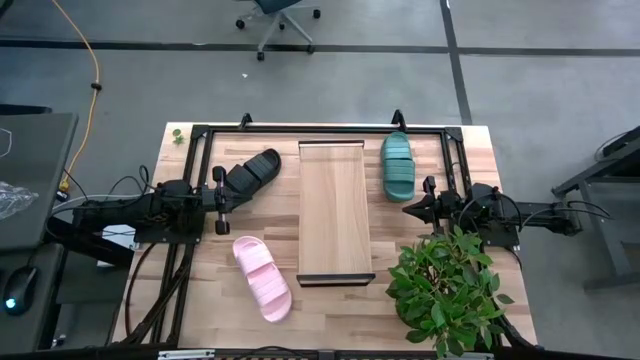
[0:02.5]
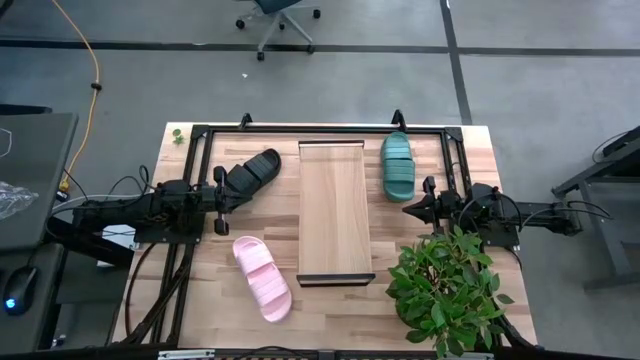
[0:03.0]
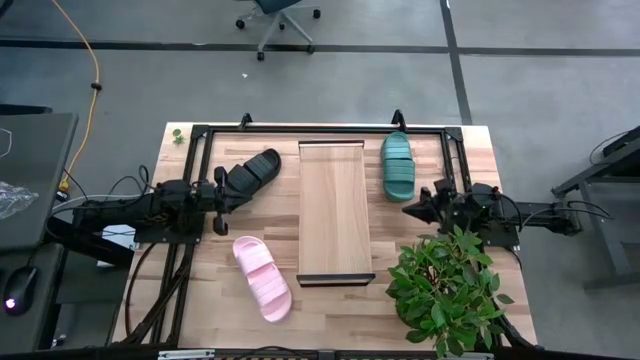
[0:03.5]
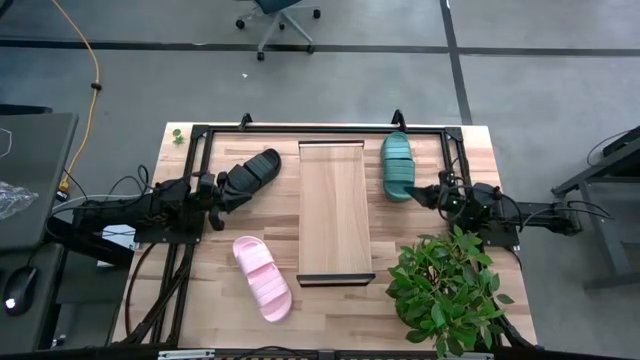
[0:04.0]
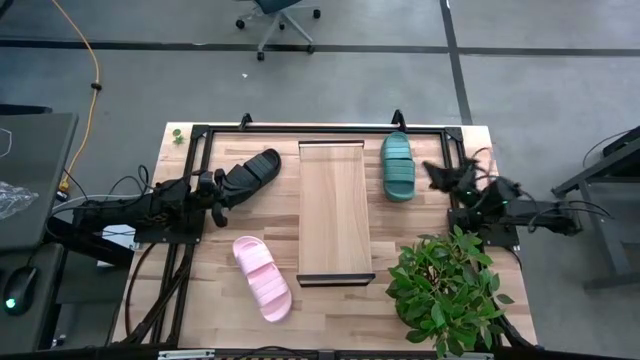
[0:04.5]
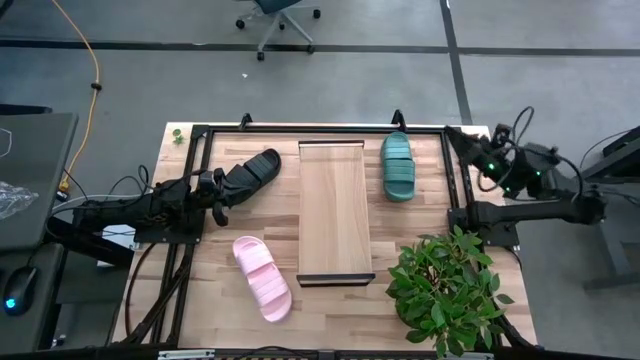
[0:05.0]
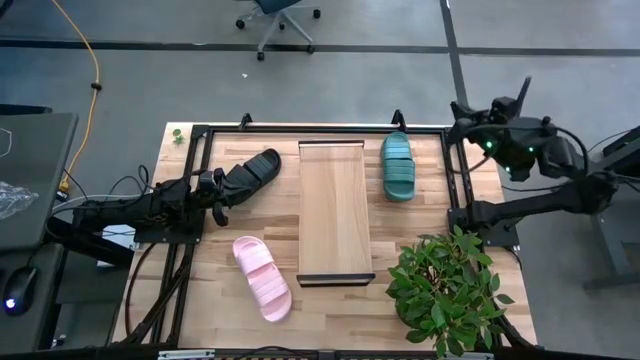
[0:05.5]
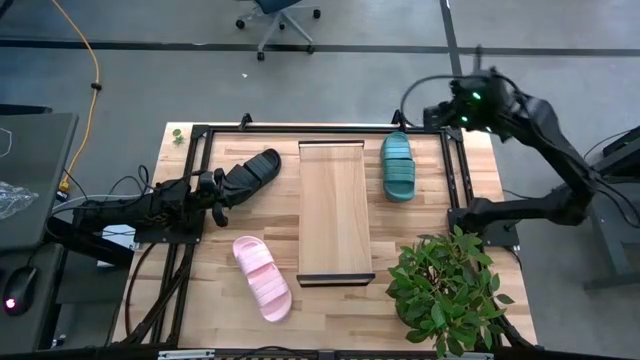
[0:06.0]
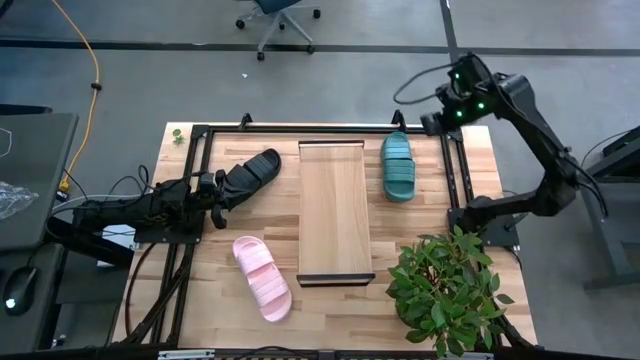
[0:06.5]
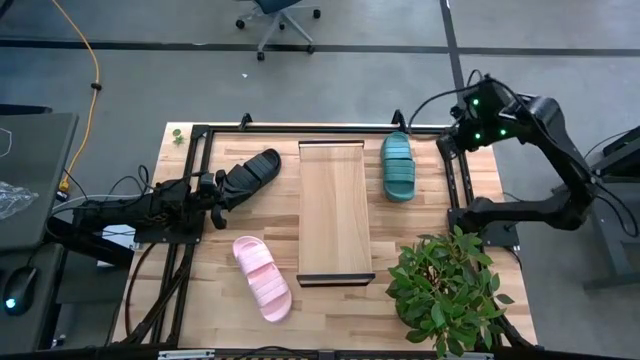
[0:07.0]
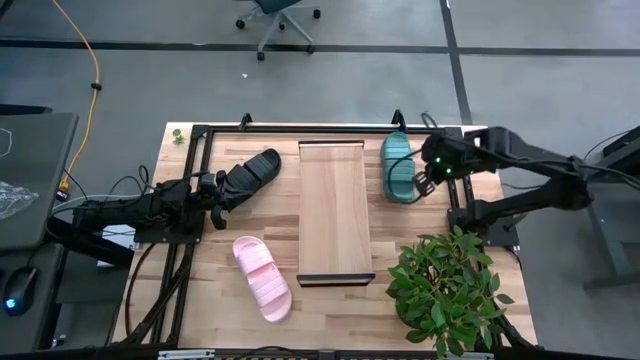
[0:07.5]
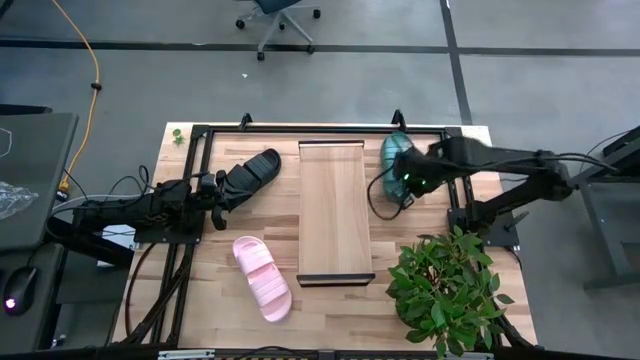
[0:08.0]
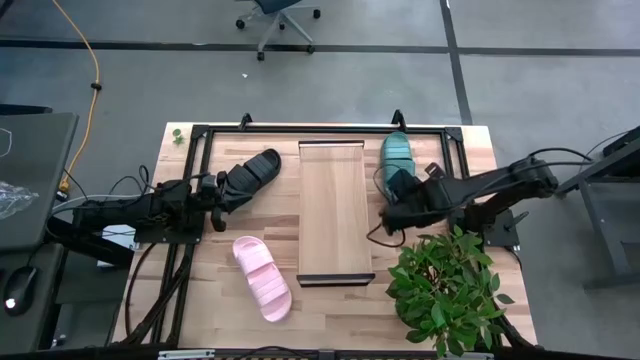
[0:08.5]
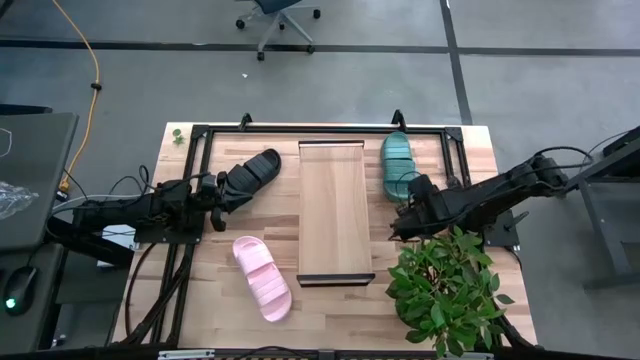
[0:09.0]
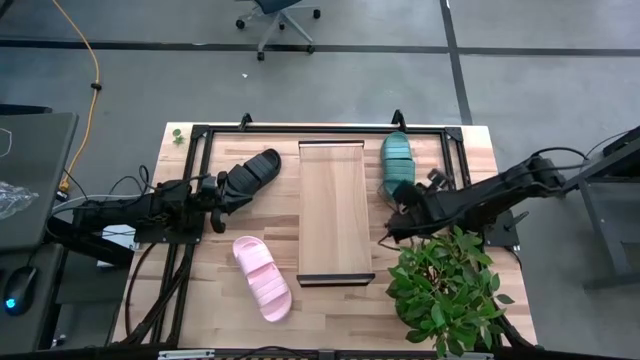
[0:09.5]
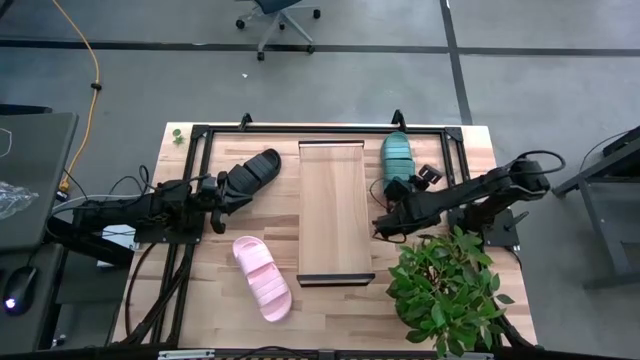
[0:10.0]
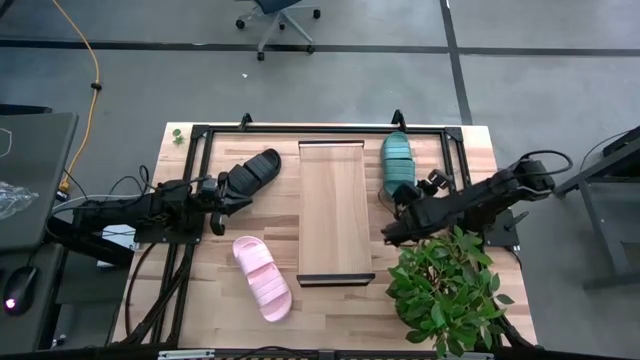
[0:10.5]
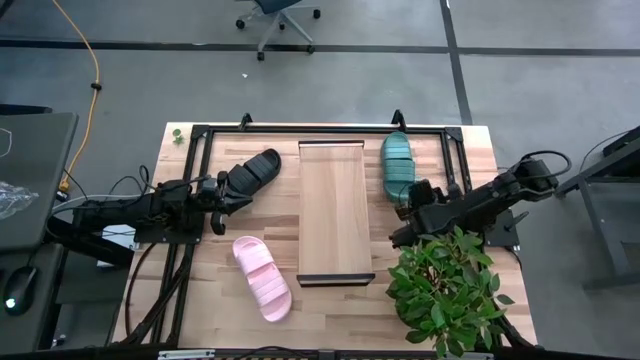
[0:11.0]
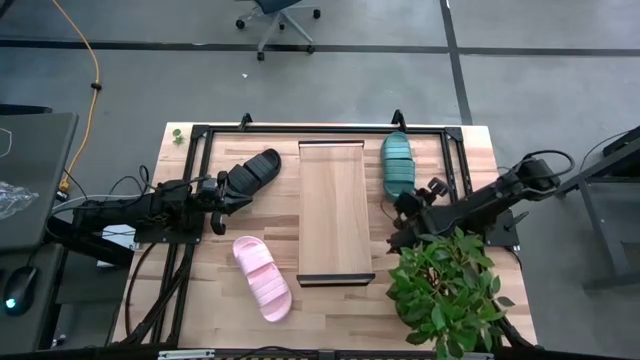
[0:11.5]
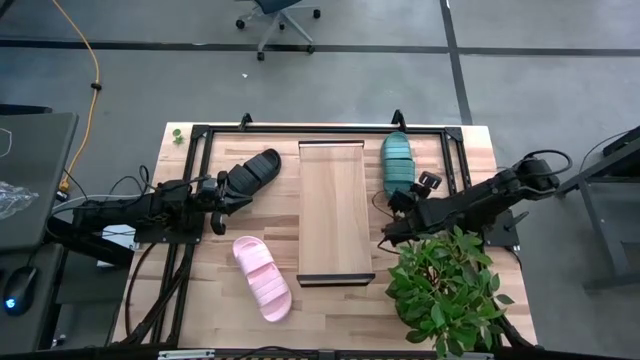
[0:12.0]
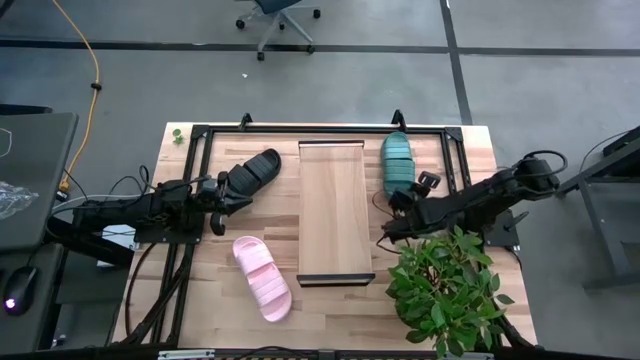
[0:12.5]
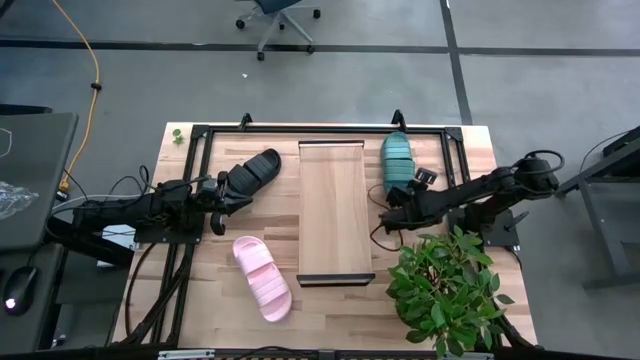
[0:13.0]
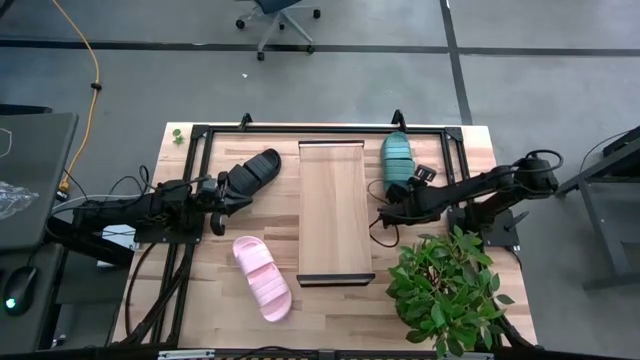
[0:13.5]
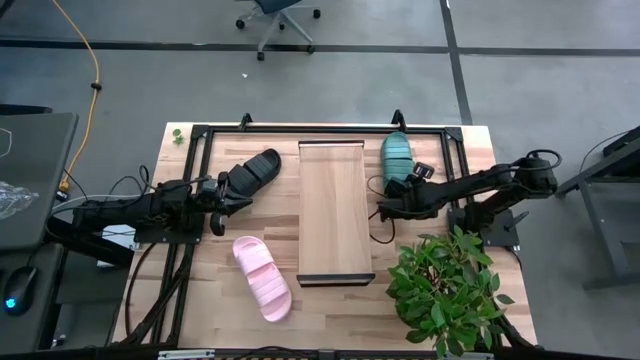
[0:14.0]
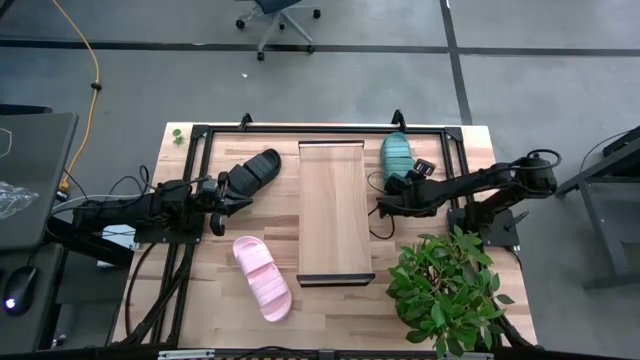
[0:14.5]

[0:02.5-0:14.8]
Task: Pick and place slippers onto the shelf
Put the green pair of slippers on the shelf

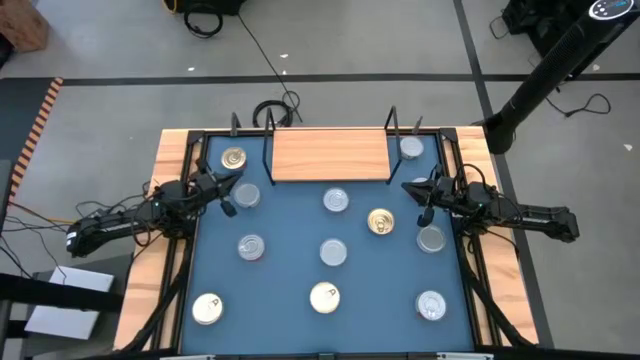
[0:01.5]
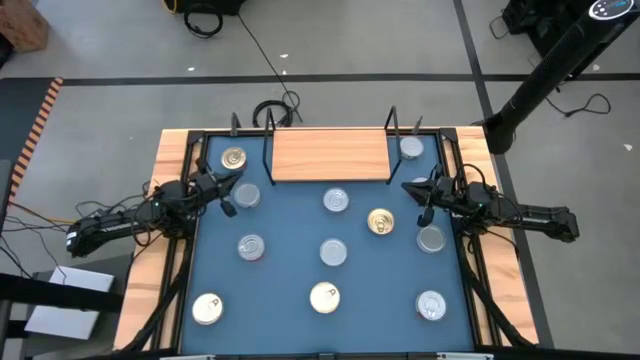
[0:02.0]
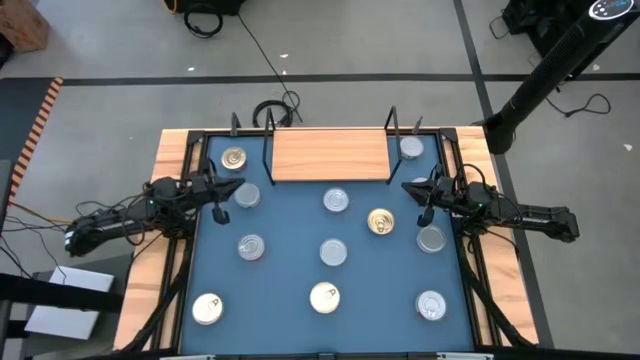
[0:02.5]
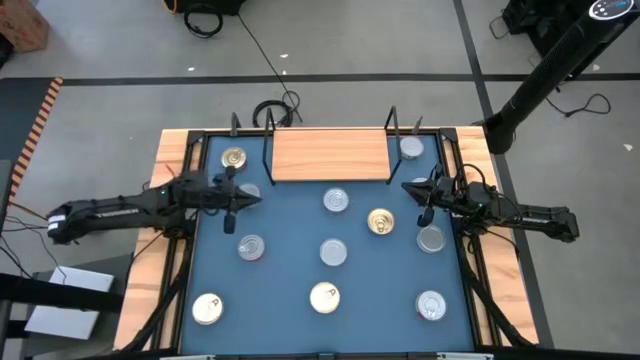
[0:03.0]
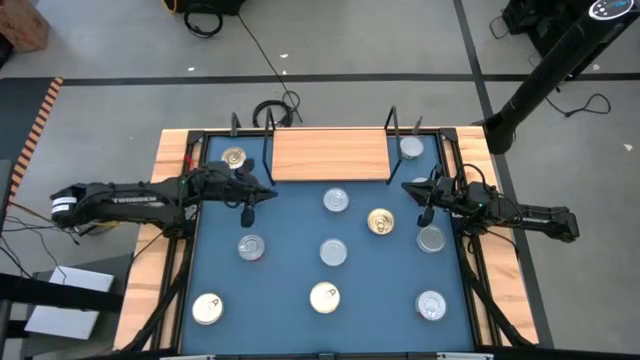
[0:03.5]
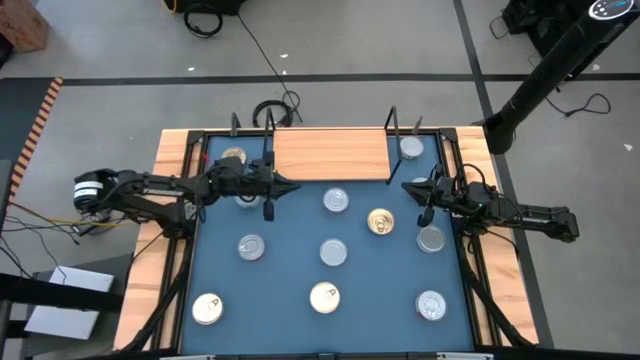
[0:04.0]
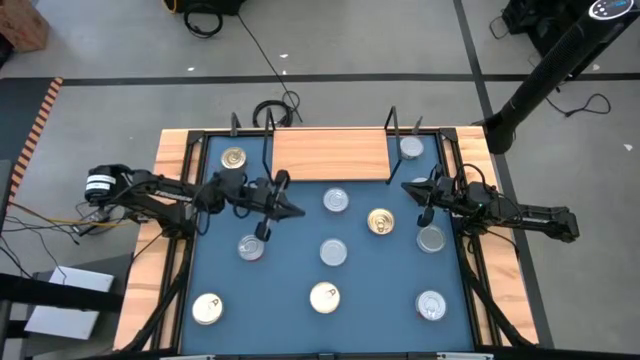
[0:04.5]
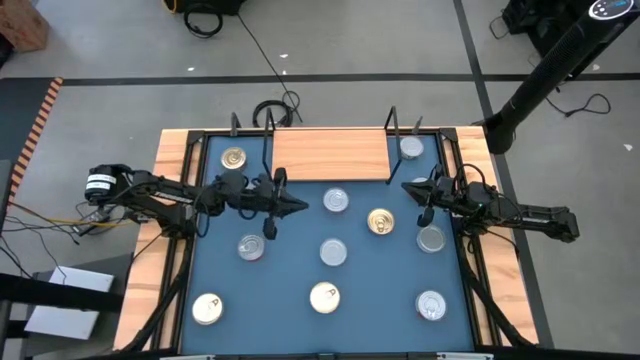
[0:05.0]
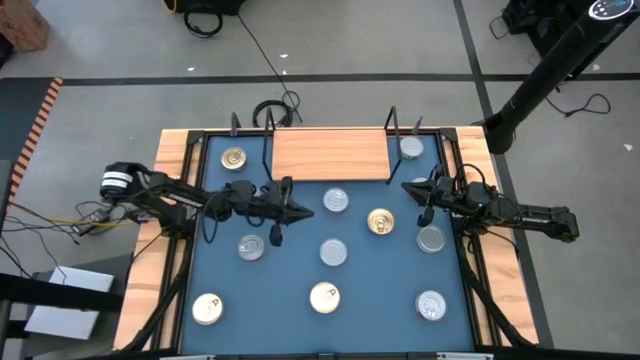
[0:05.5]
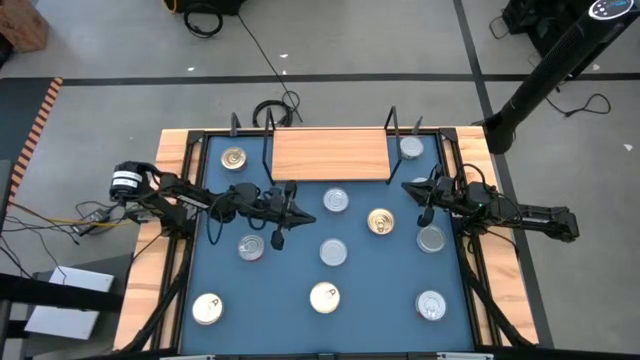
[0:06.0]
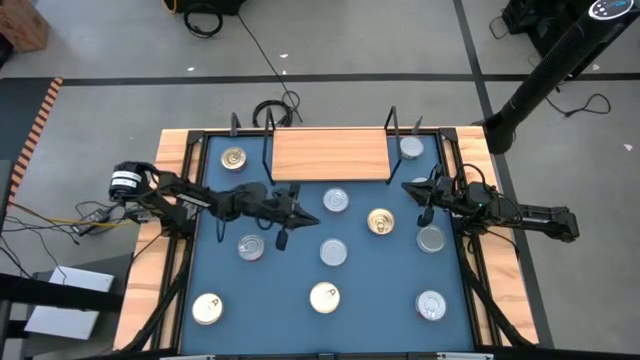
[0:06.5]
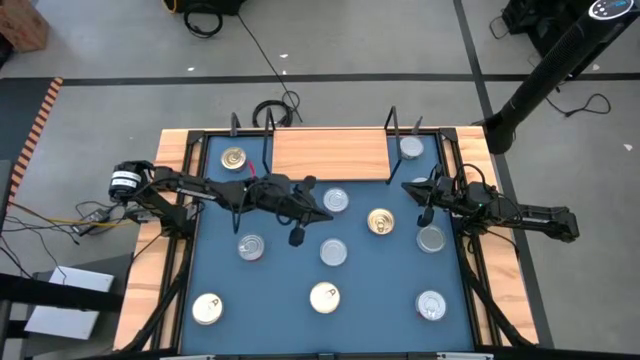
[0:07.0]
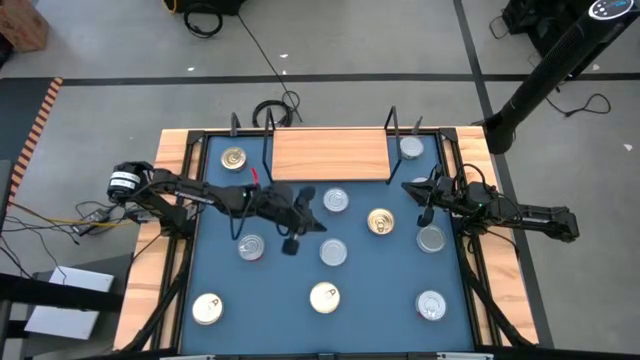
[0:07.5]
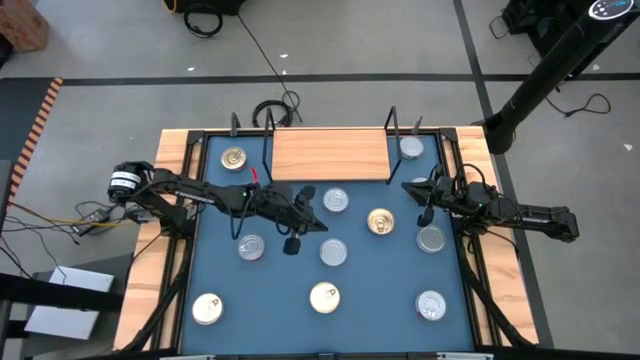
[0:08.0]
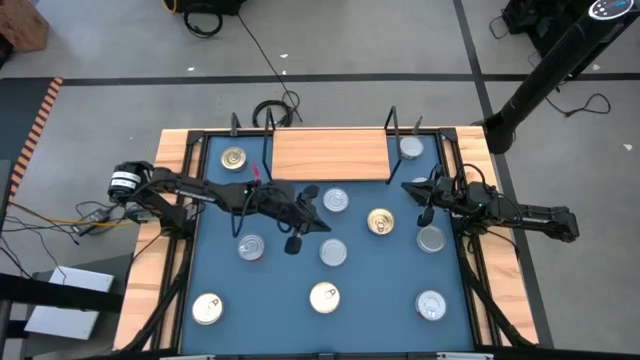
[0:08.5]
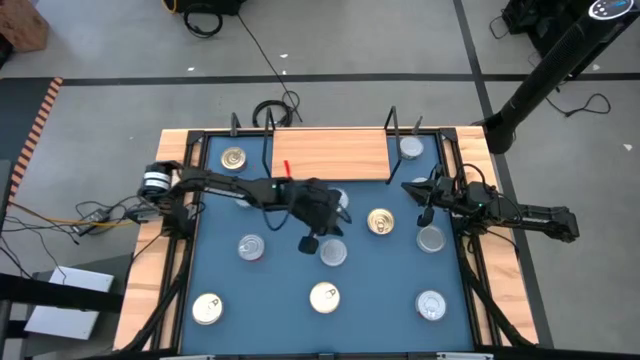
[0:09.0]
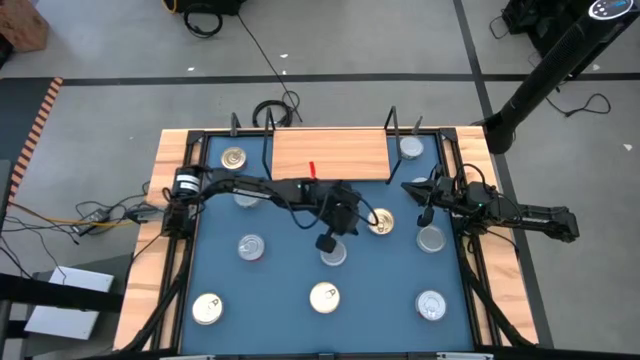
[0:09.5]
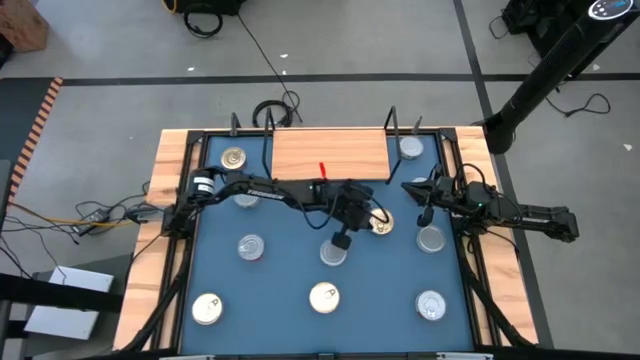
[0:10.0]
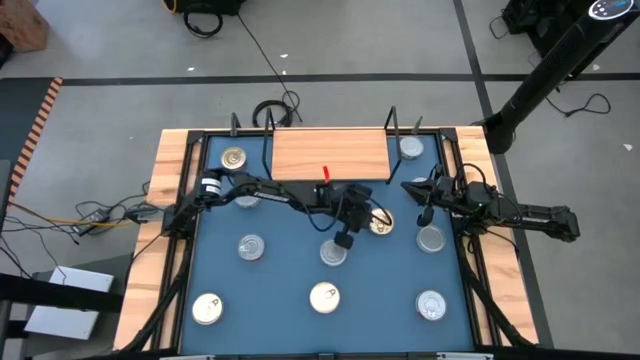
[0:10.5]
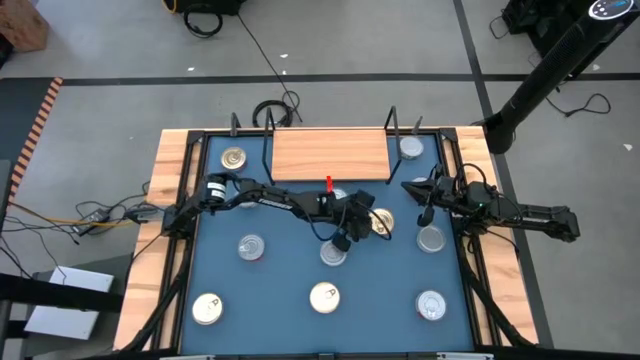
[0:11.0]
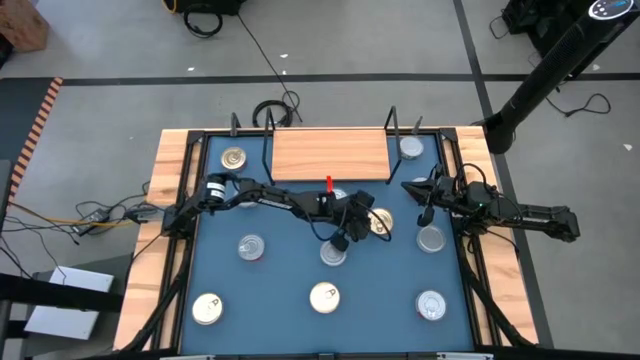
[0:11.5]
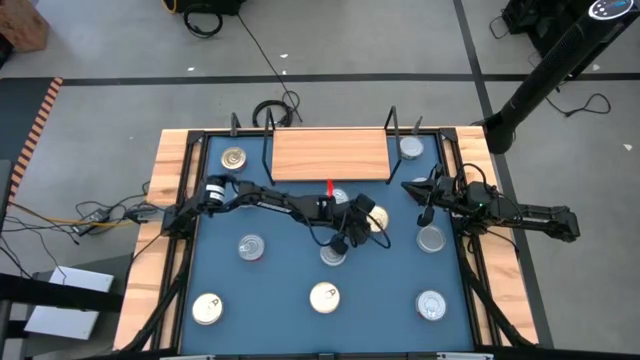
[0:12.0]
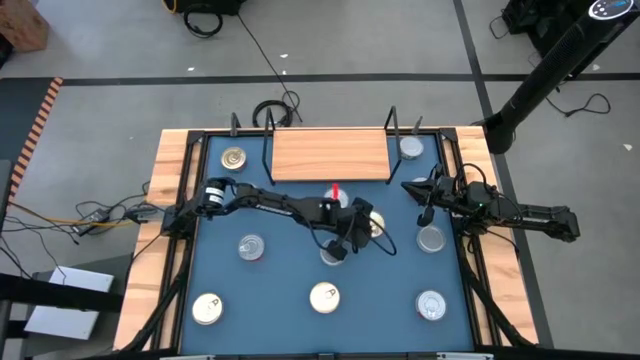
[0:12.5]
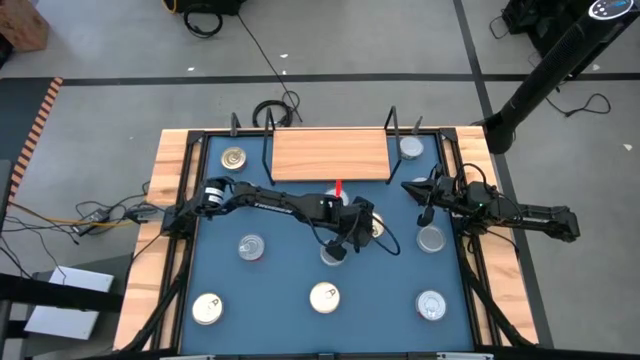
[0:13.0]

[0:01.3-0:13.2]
Task: Stack canned seafood by type on shelf
Put the top right blue tuna can on the shelf
